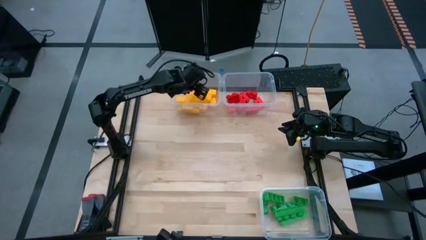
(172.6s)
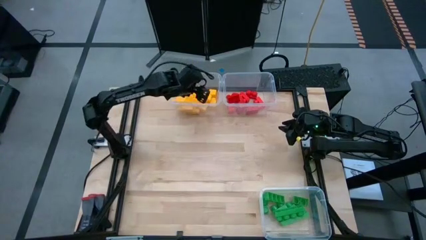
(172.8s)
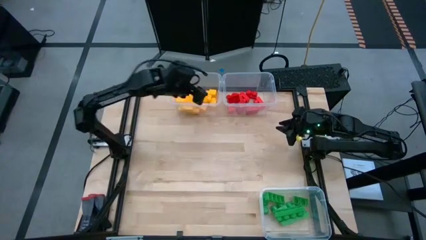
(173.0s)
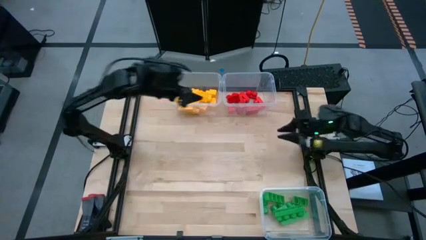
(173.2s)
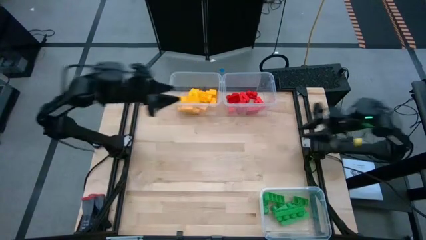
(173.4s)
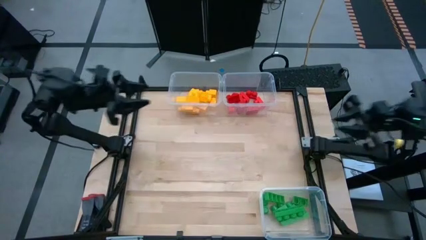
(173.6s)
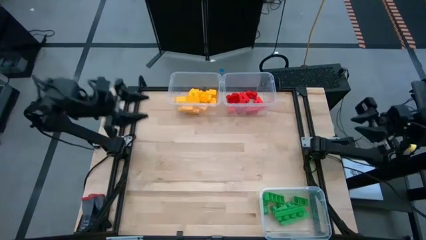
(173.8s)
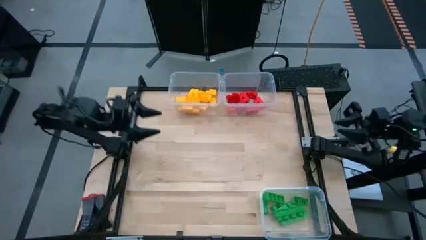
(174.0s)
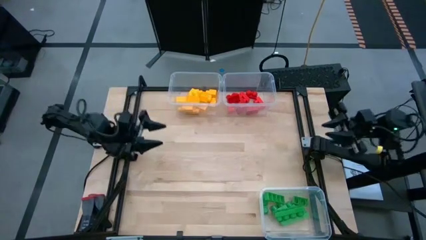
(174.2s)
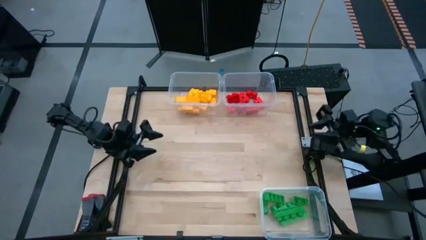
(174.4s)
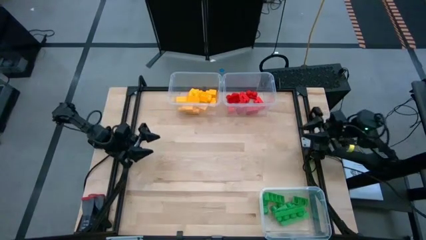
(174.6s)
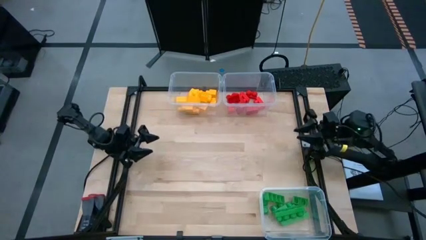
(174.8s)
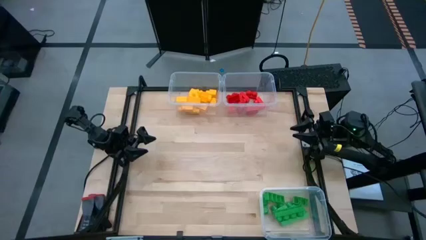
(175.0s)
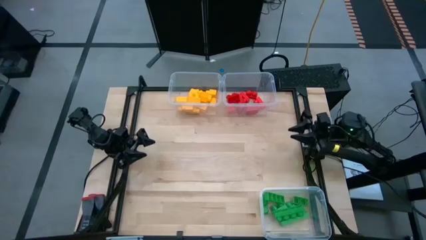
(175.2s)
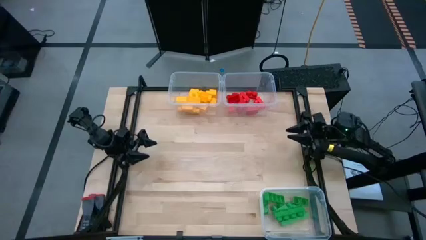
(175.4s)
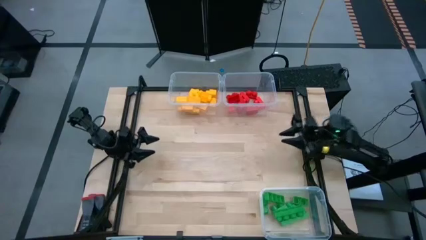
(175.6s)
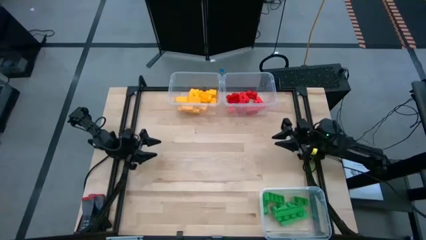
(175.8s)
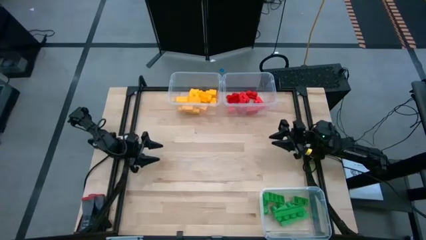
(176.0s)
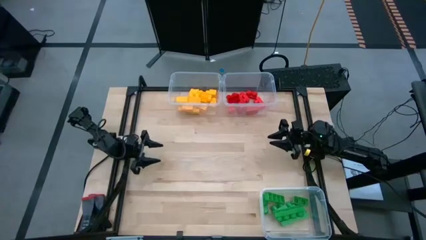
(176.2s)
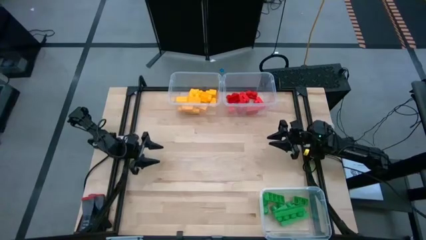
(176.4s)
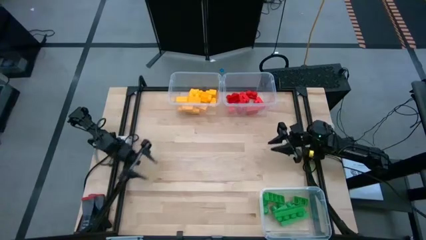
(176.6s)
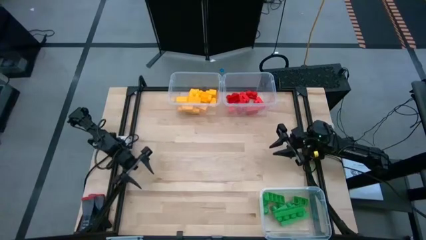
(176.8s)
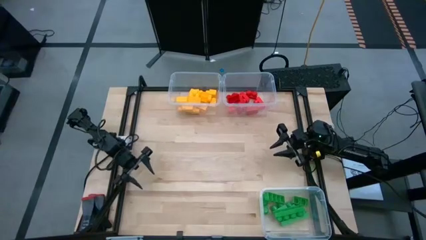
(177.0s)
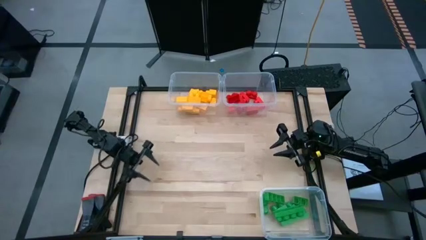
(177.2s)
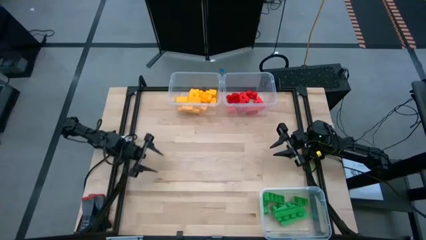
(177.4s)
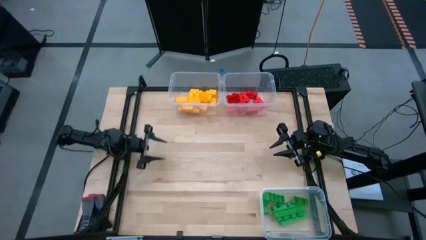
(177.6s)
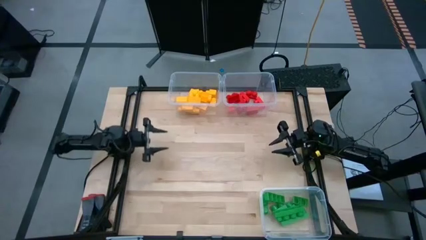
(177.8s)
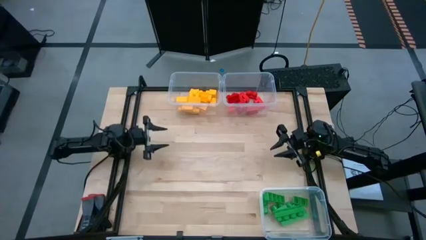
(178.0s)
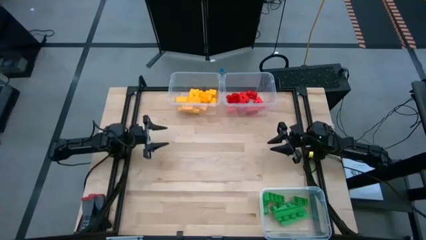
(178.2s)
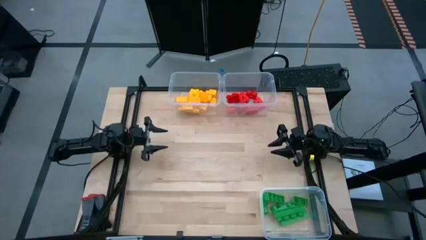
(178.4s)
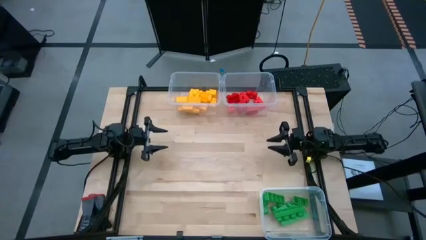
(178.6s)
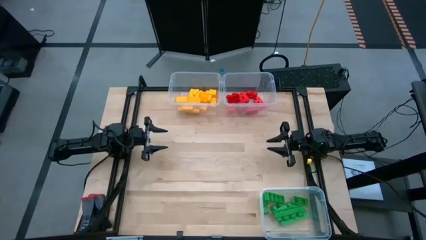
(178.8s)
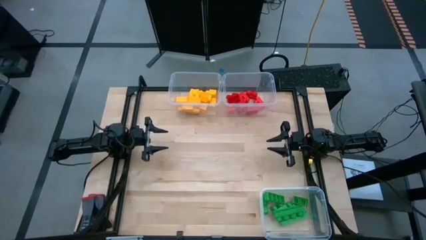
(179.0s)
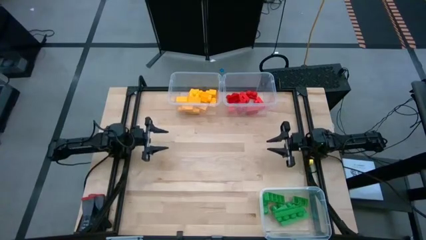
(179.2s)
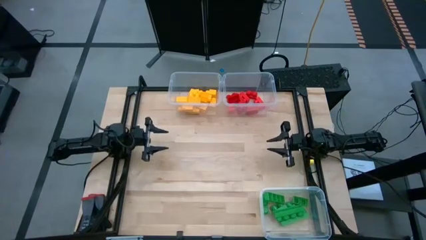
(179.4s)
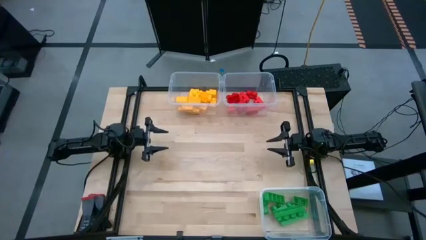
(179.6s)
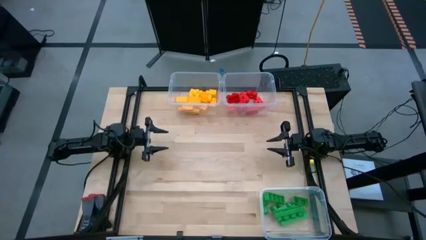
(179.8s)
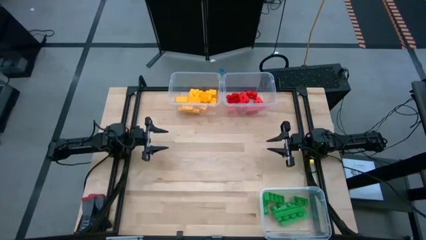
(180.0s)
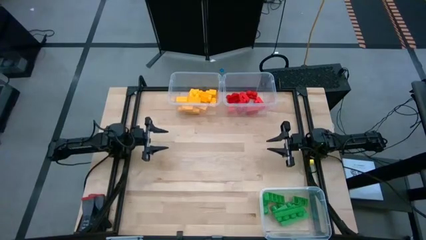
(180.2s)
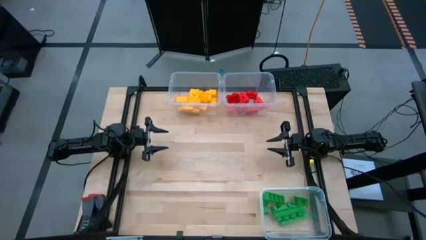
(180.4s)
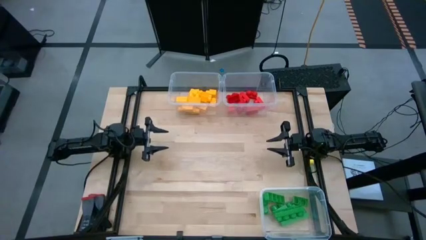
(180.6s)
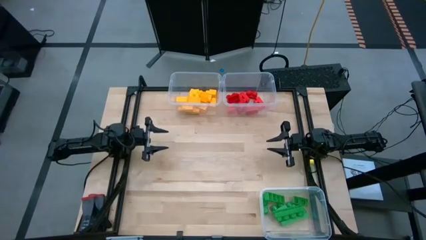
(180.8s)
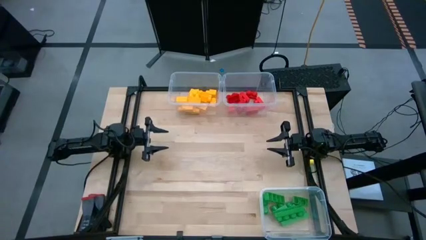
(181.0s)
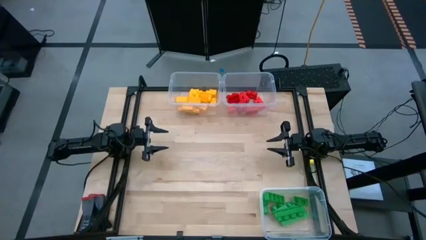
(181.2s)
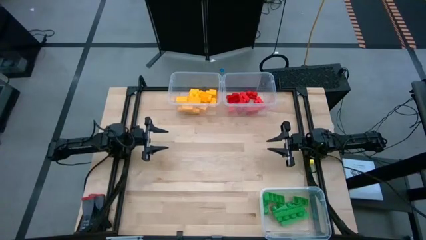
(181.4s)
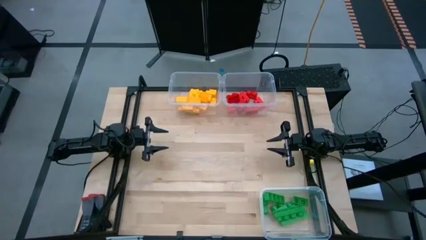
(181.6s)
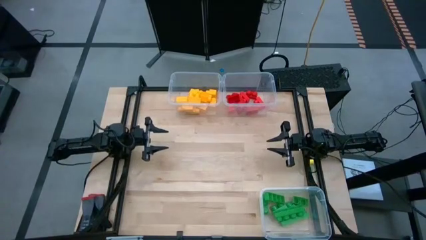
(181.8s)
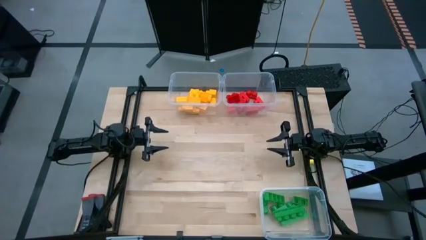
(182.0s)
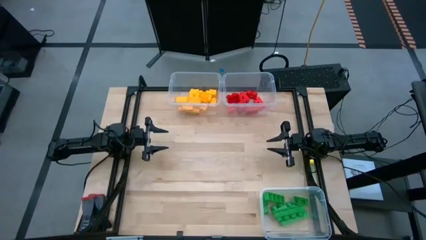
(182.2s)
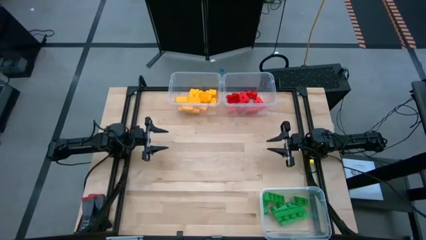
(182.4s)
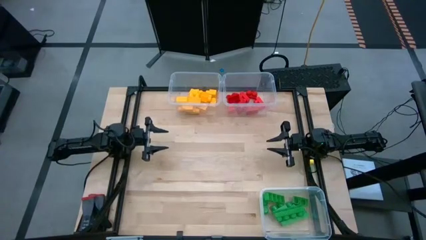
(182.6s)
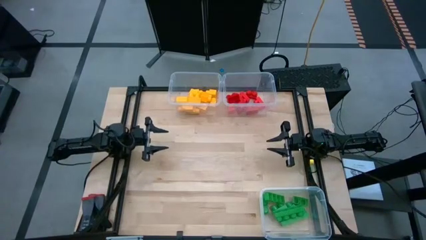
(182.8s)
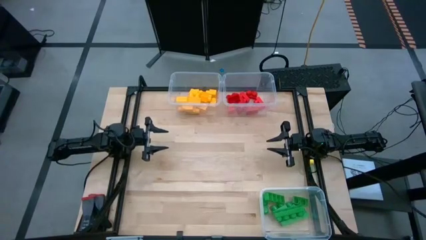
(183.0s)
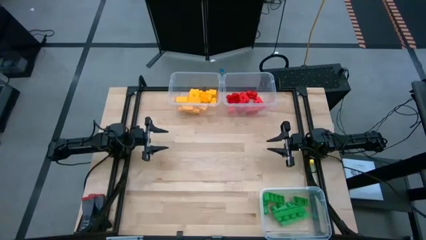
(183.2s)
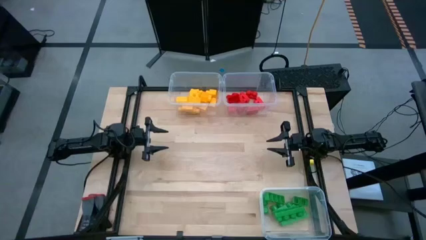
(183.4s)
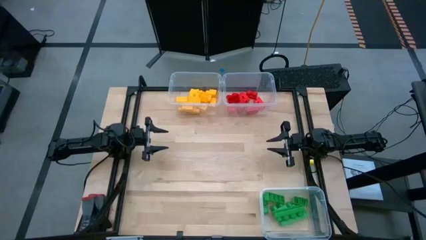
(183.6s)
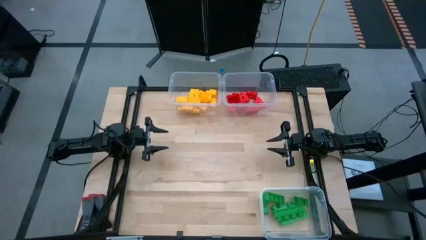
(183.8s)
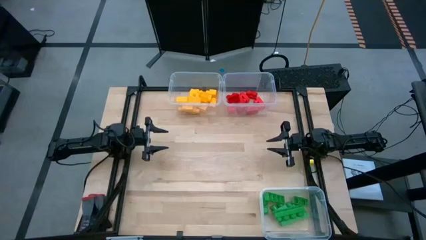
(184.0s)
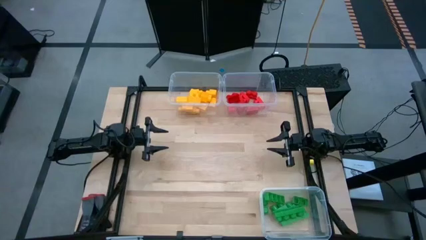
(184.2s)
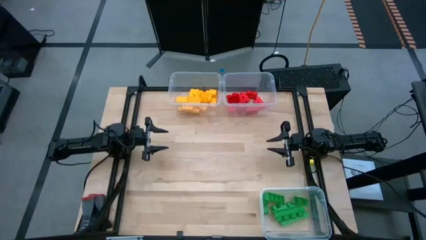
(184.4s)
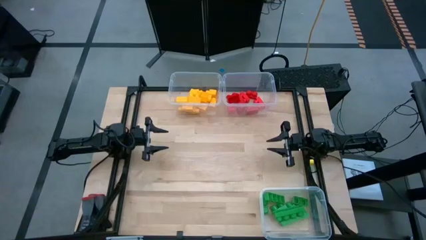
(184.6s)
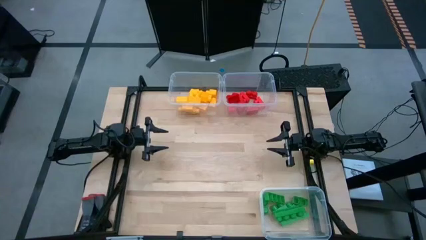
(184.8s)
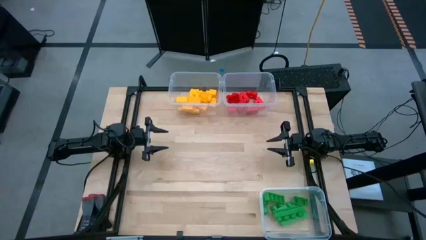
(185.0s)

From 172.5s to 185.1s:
Task: Sort blocks
Return to Home Position

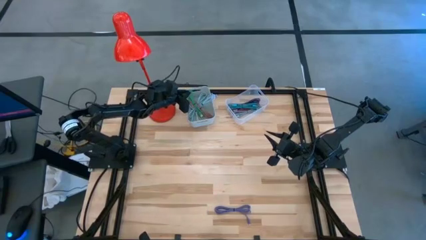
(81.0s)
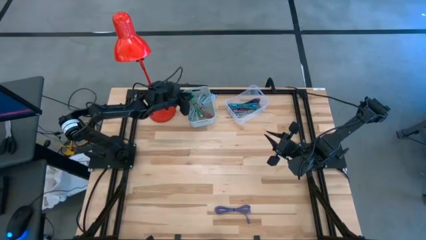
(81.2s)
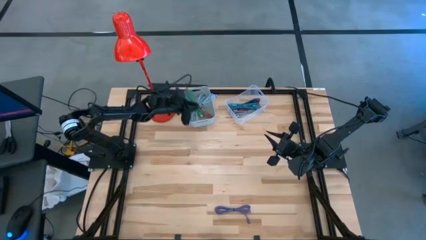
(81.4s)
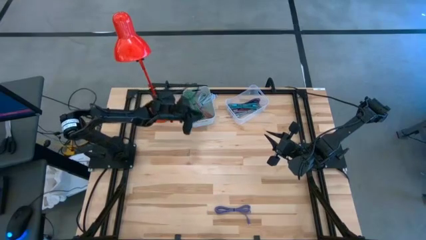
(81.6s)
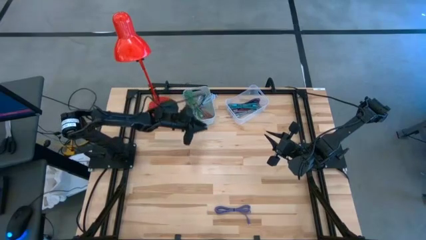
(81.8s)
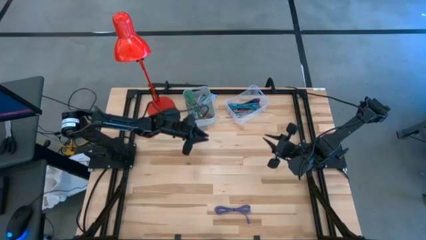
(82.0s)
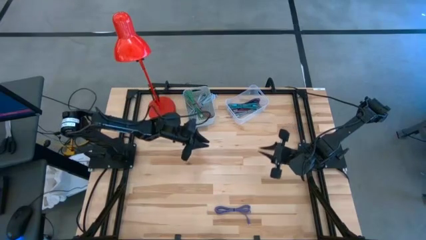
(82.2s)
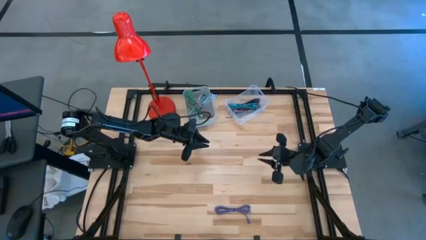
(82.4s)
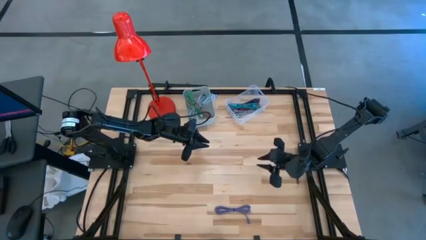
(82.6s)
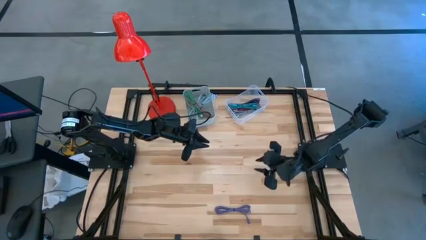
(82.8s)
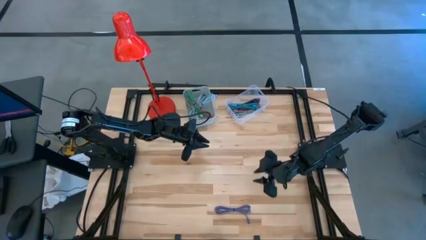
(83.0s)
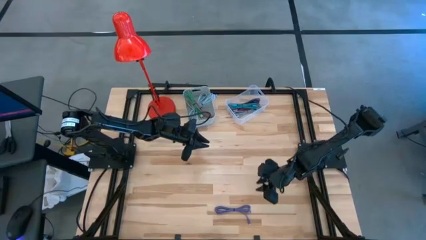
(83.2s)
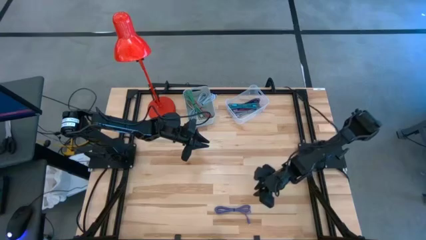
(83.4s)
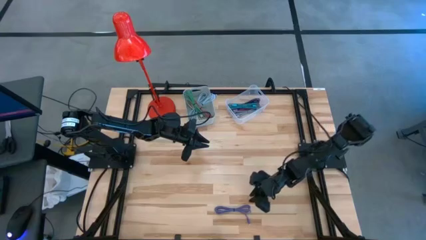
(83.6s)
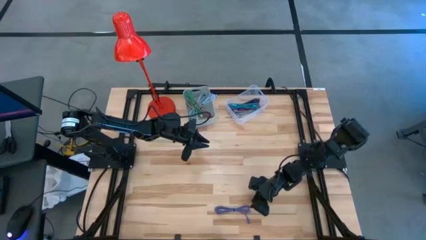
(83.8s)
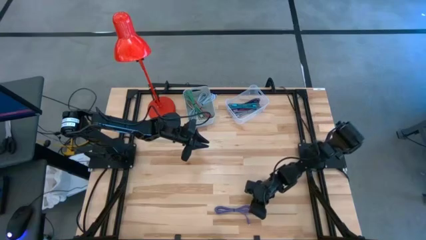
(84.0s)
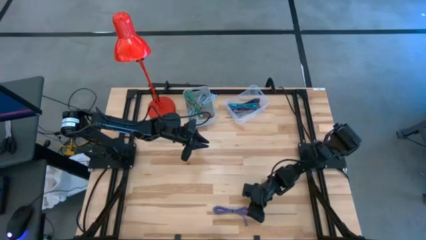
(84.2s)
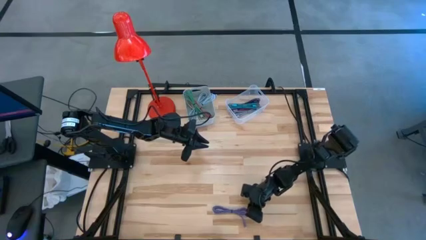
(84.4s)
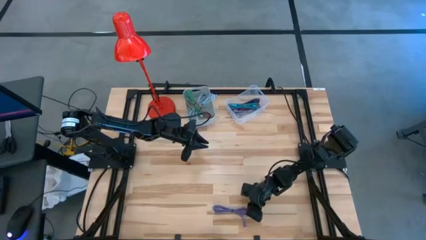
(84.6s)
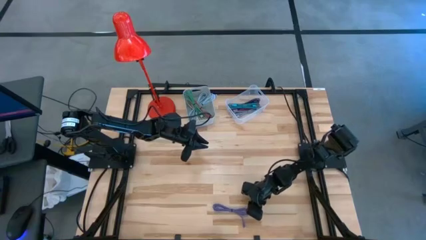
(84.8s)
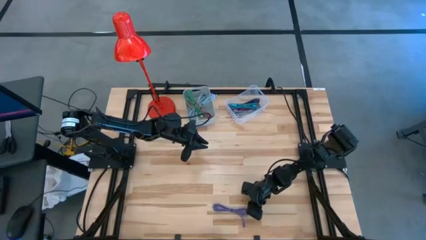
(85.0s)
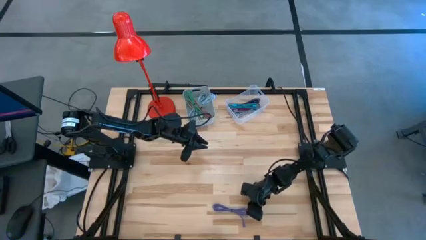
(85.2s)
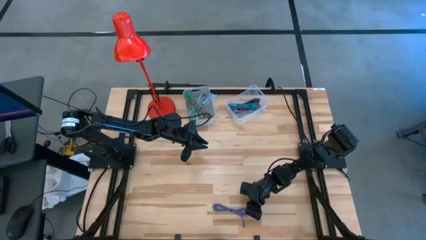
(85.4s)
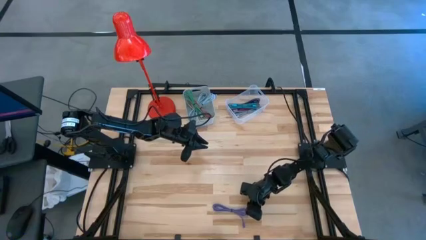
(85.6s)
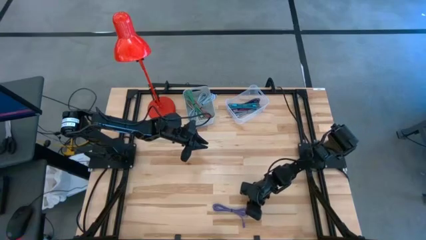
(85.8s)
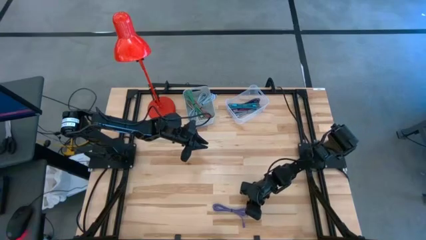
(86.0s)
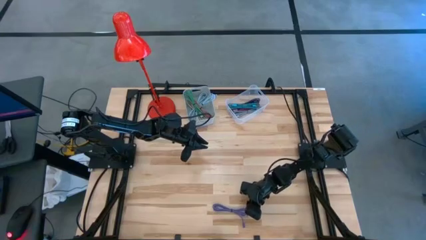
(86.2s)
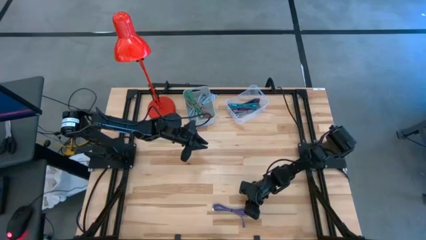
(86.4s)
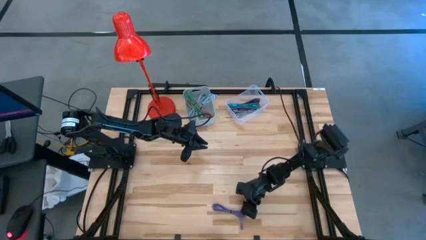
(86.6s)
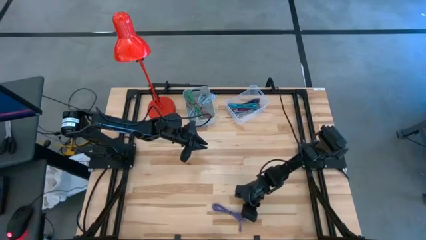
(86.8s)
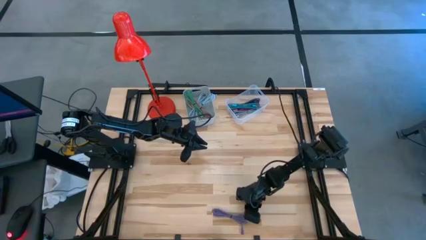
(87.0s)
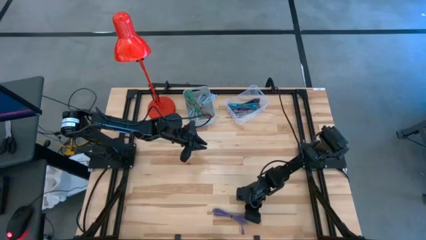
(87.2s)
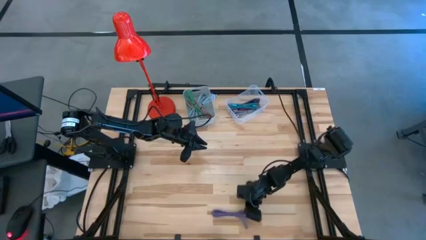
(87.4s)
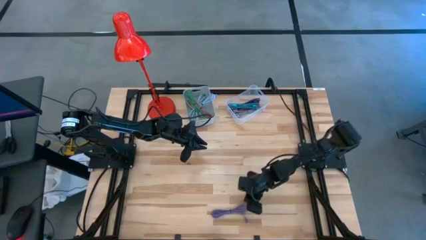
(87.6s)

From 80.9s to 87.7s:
Task: Pick & Place USB Port
Put the purple charger cable into the gray bin
